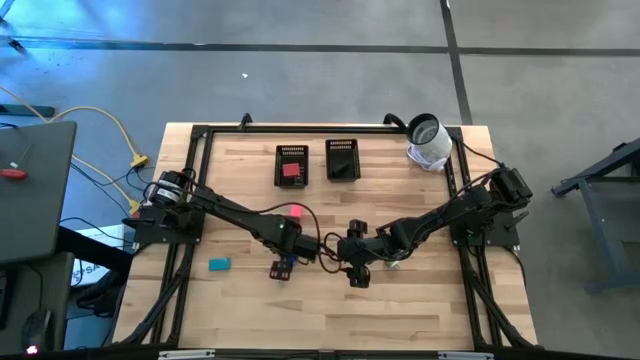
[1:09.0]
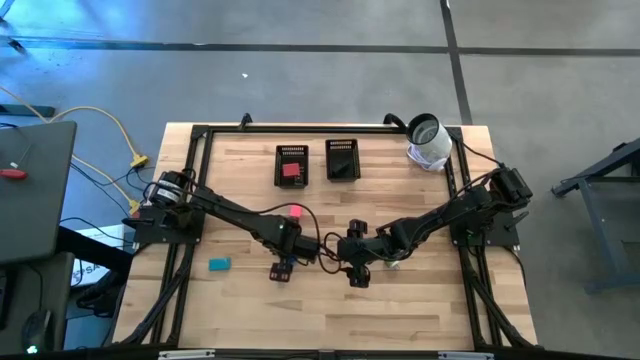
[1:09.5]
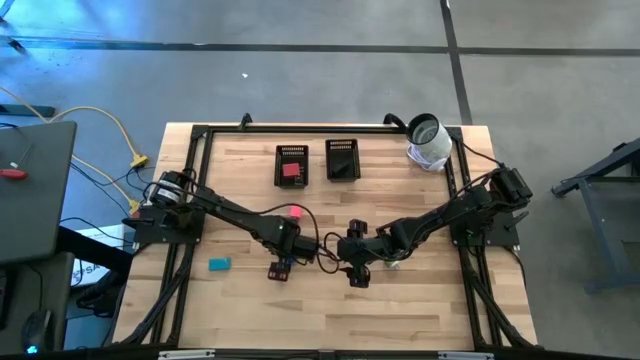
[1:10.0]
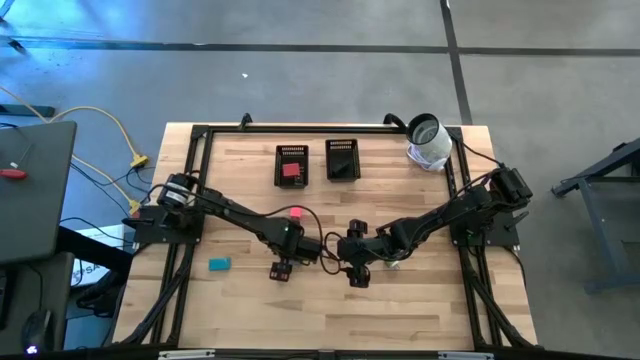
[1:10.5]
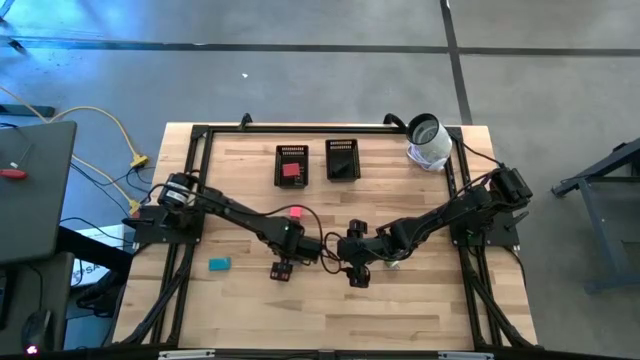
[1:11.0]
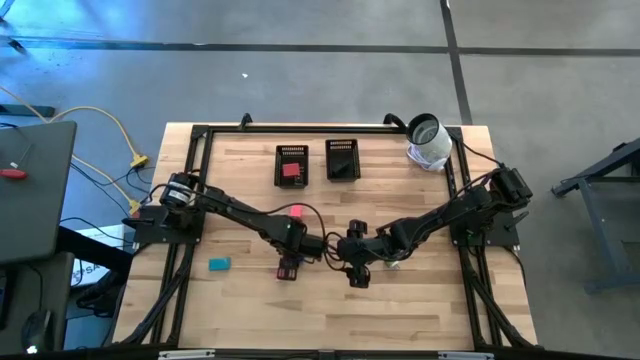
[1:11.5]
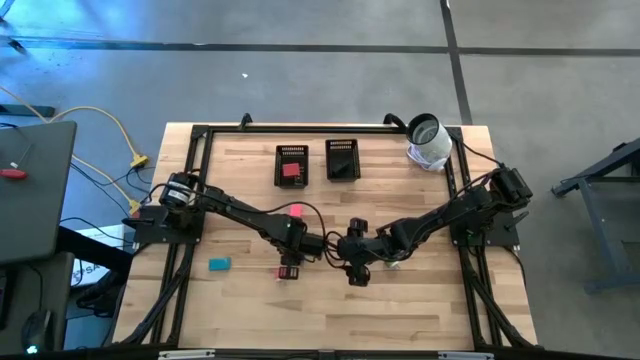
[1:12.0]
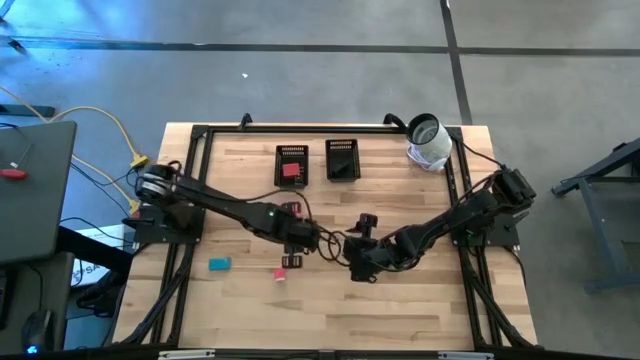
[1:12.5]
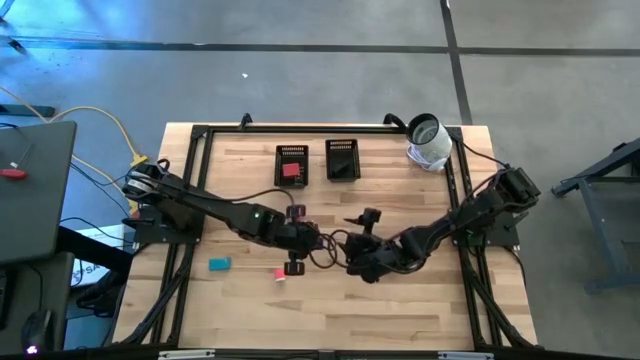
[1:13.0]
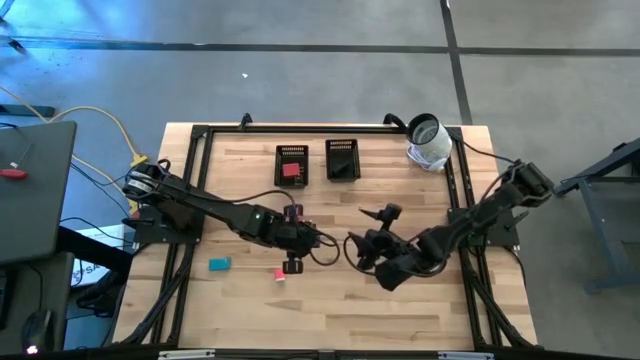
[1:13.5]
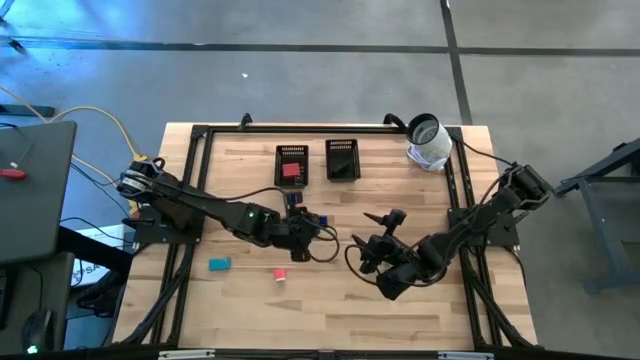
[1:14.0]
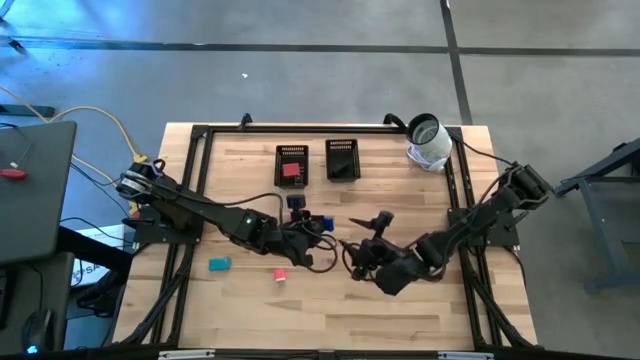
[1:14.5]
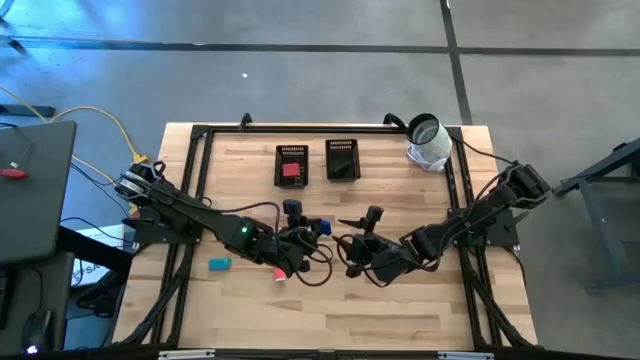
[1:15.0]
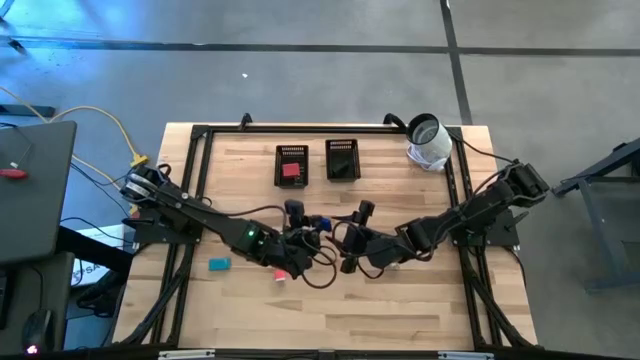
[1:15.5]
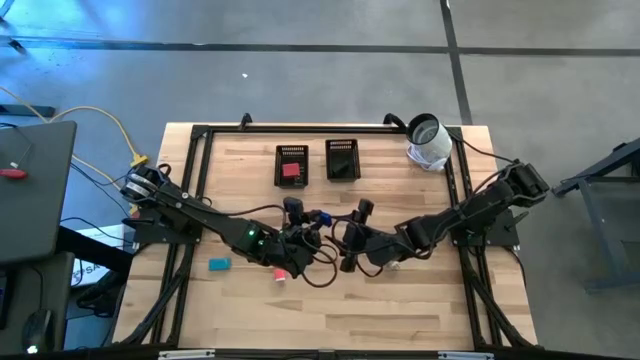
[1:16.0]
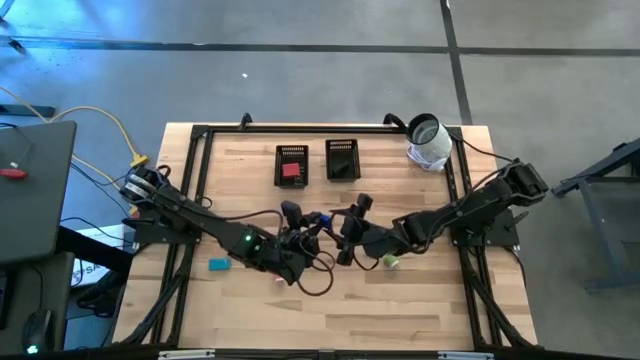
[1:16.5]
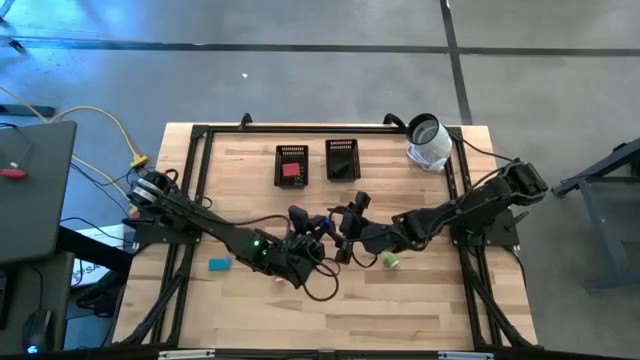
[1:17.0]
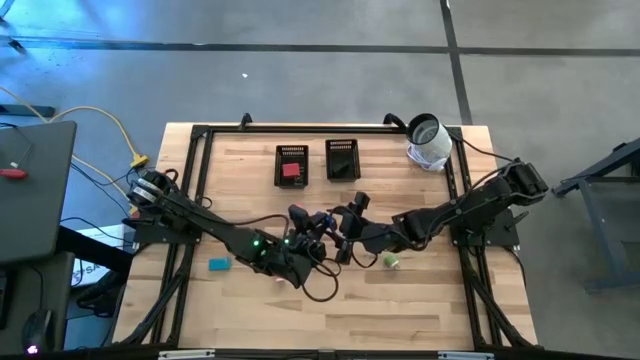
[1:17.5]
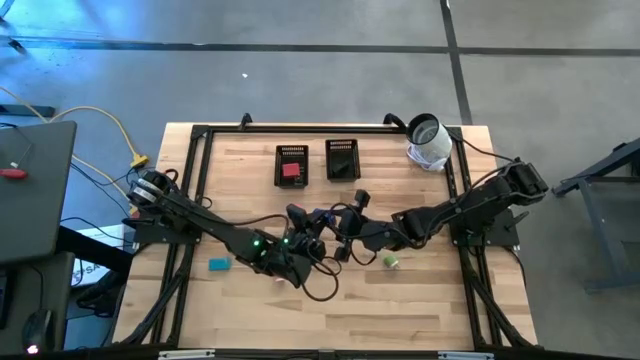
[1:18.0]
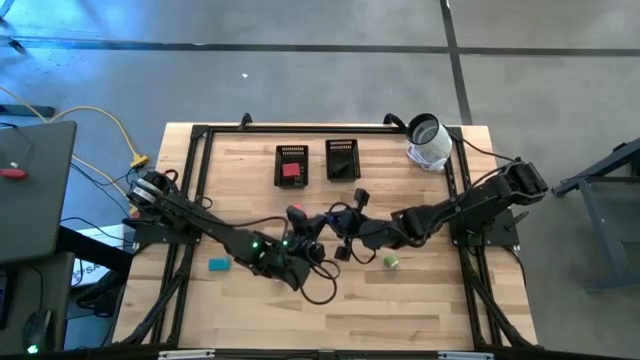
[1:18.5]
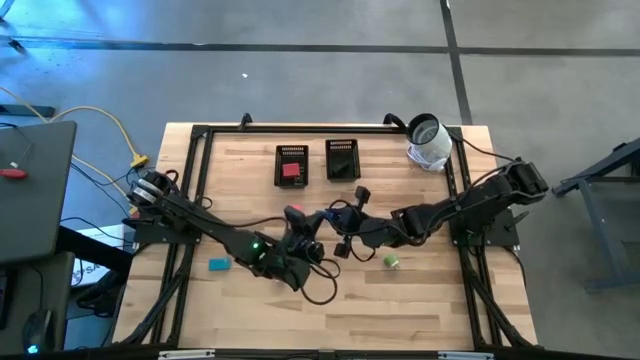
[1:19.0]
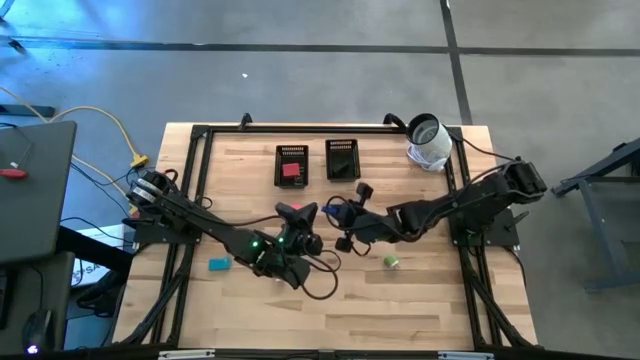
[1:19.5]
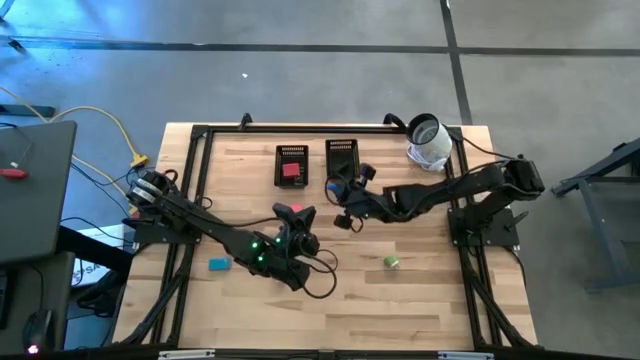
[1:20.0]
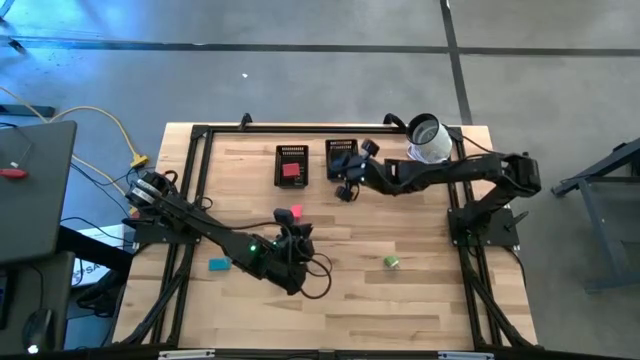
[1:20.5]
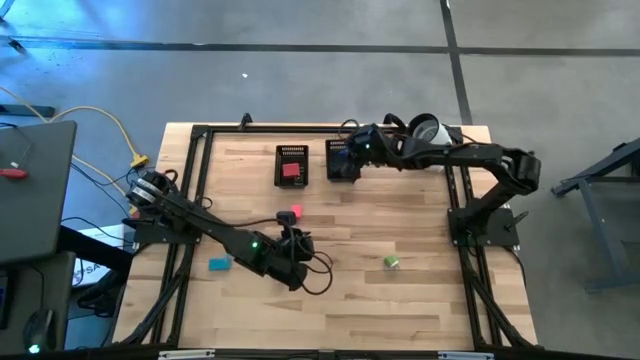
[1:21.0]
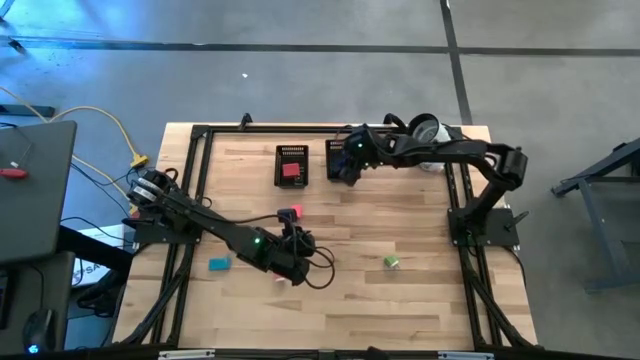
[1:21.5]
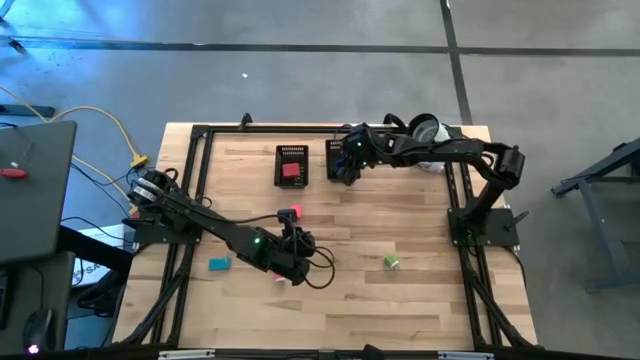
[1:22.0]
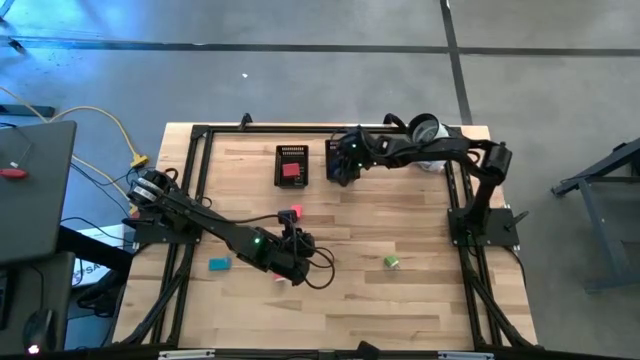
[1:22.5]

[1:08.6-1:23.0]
Task: Pick & Place Office items
Put the blue digital clock into the right black bin

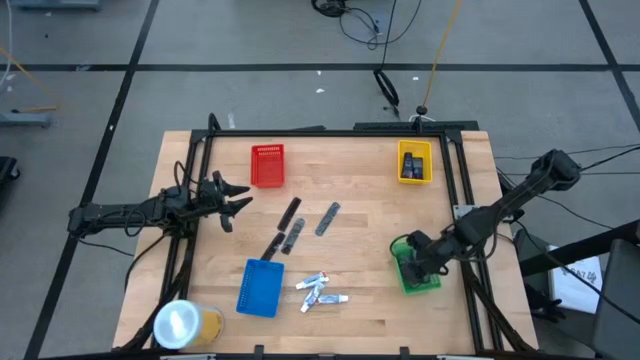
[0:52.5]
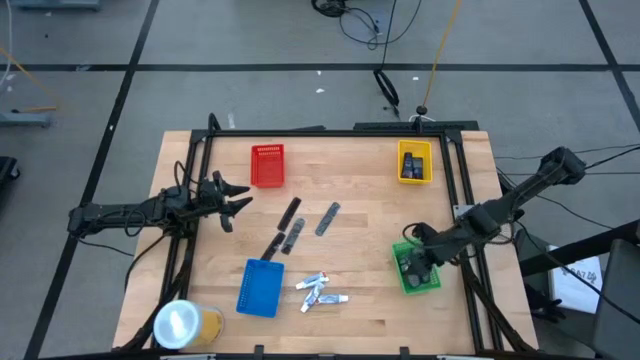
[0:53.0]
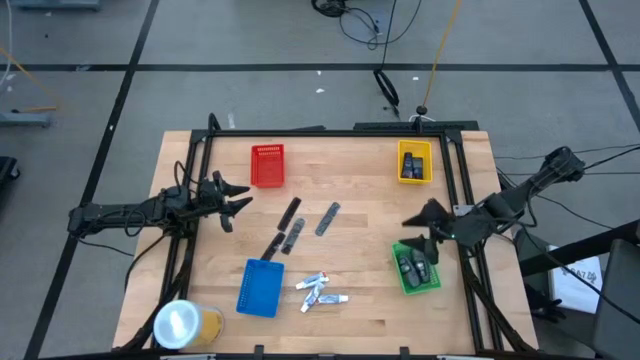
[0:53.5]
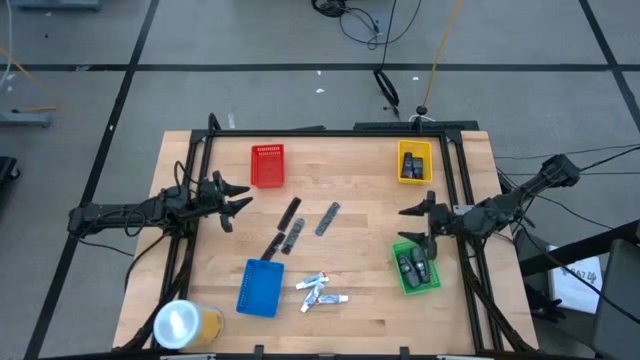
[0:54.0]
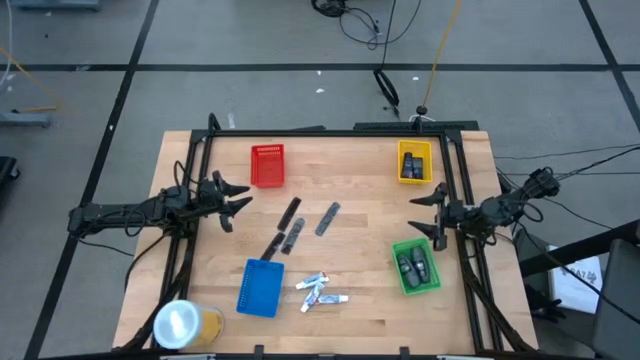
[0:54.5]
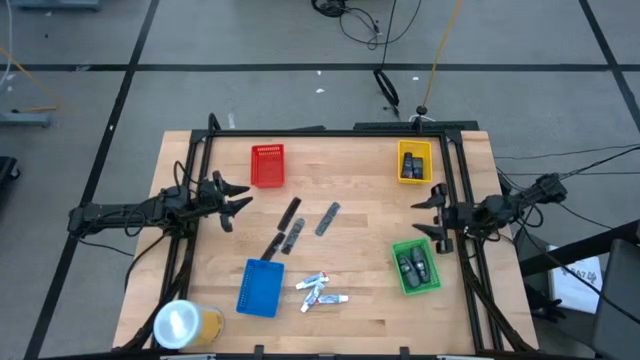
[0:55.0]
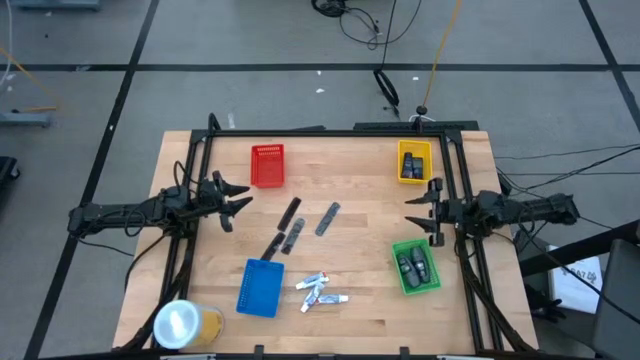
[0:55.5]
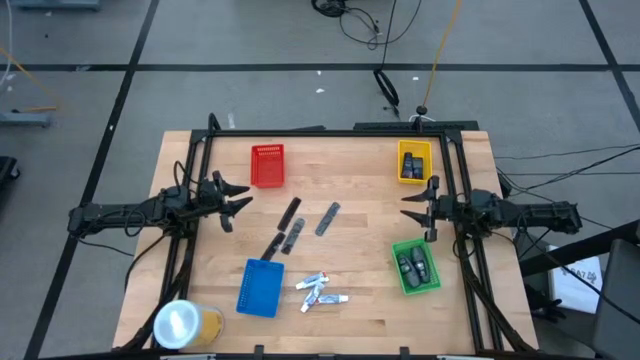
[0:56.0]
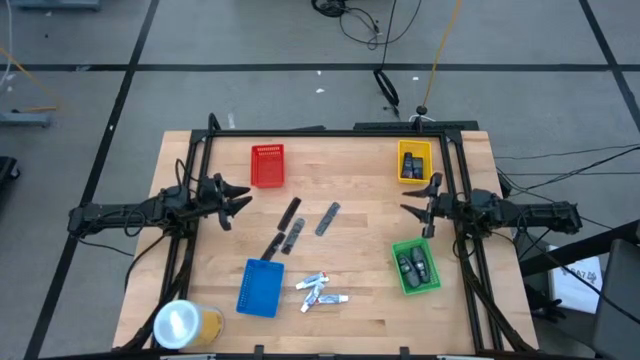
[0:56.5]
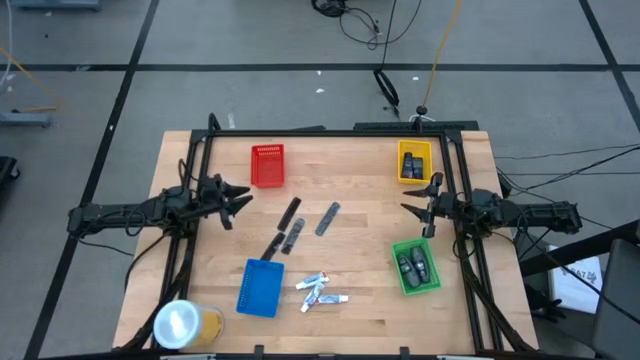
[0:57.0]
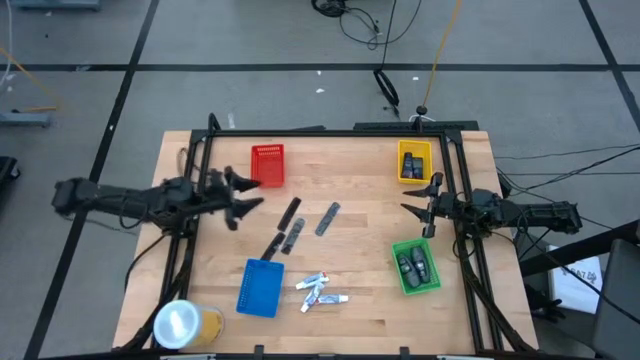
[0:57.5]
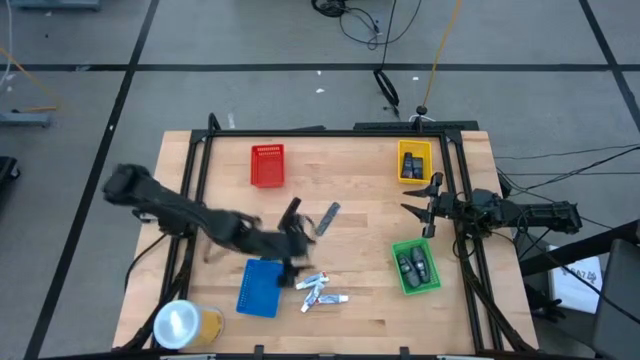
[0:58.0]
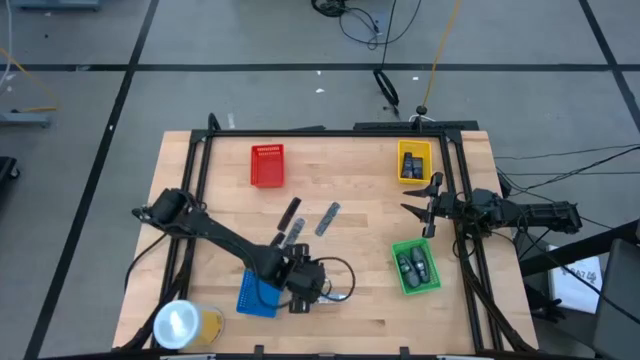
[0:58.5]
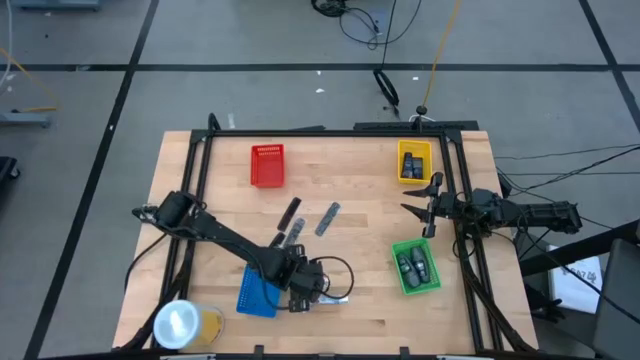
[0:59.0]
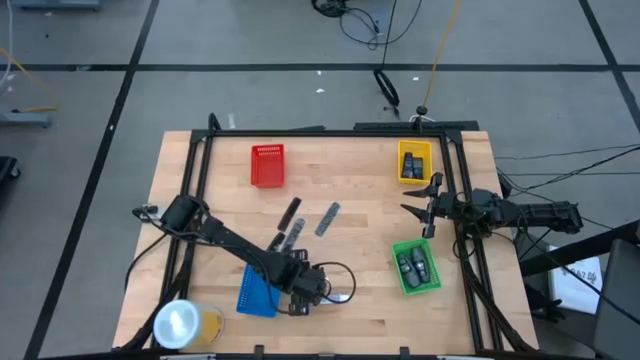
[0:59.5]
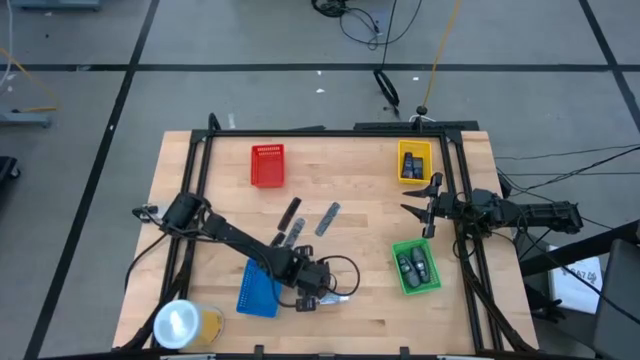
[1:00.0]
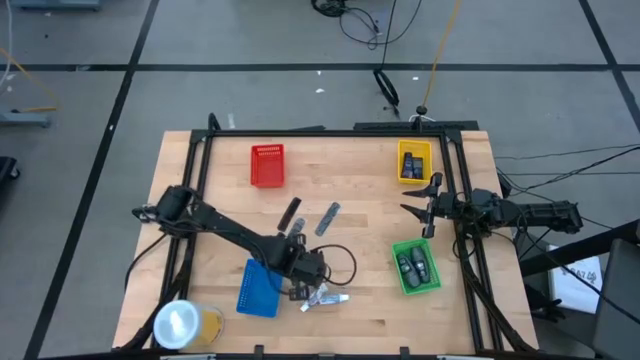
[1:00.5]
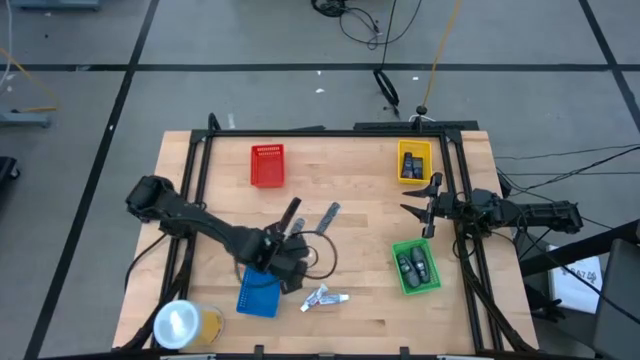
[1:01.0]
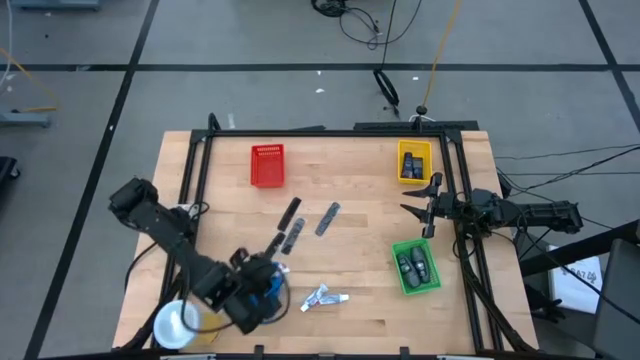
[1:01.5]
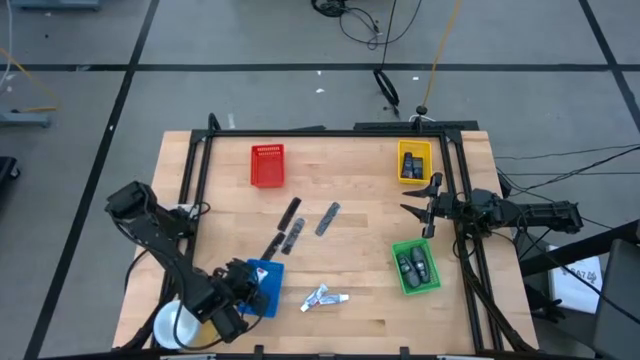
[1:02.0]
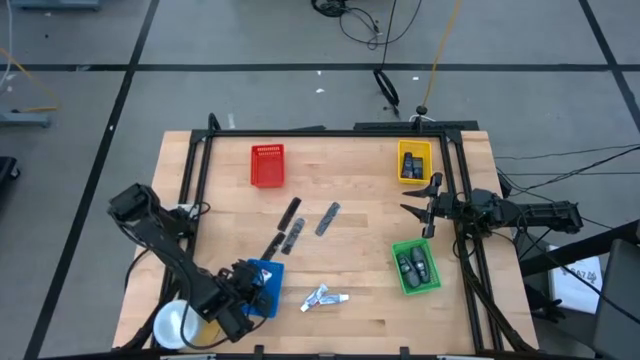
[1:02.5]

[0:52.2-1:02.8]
Task: Pick & Place Travel size toiletries
Put the top white purple toothpaste into the blue basket
